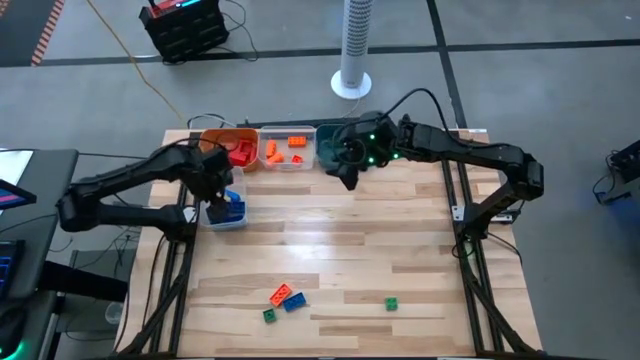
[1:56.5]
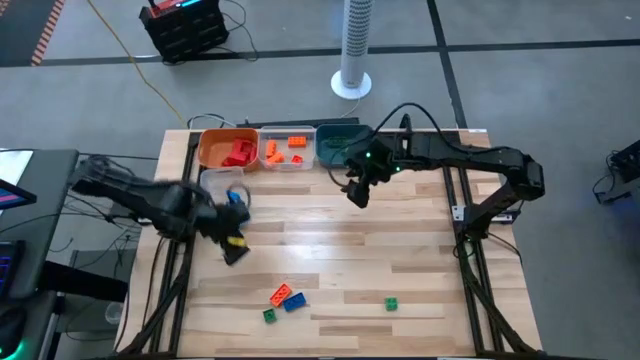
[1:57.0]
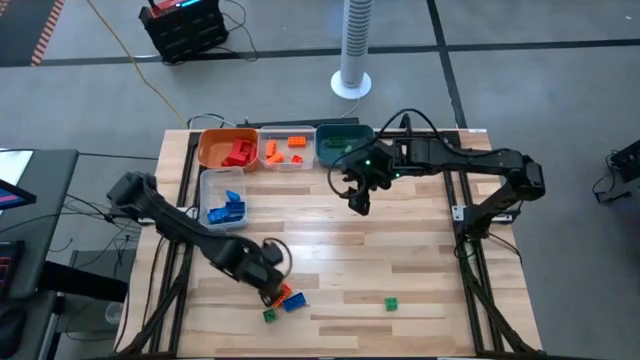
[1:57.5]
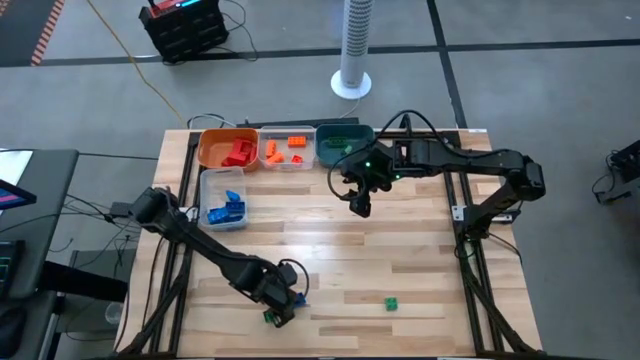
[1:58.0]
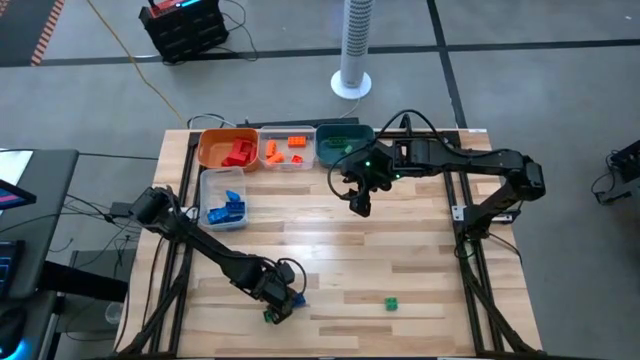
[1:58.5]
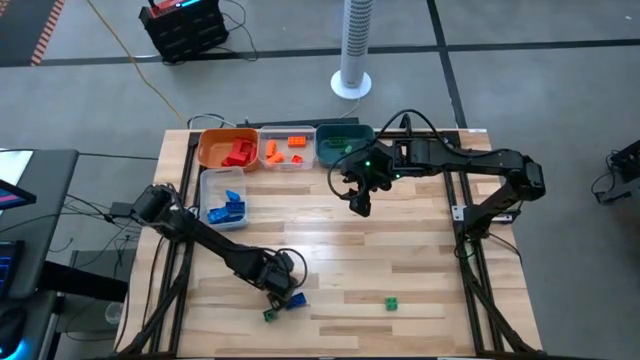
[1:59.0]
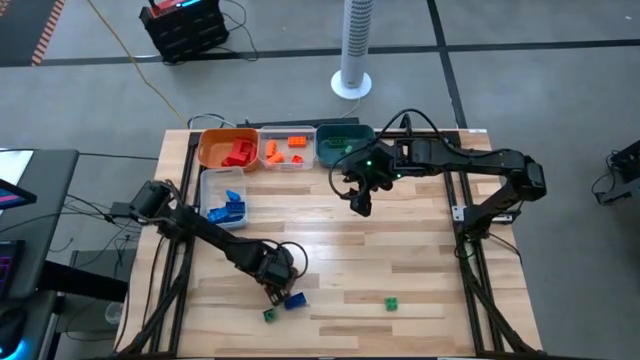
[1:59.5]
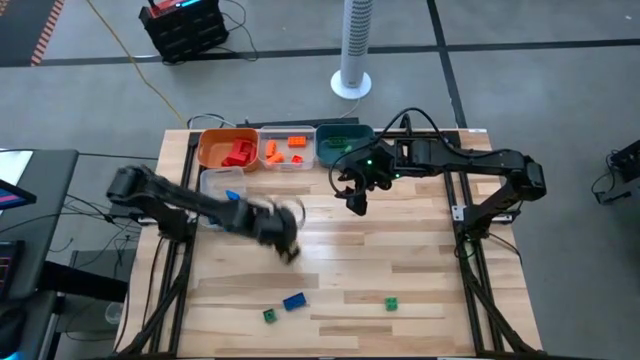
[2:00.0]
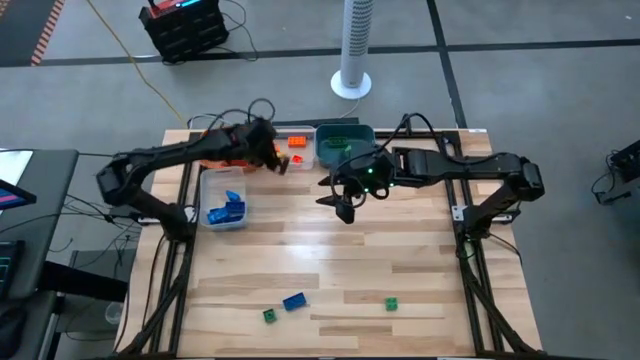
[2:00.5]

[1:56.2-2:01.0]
Task: Sort blocks
Put the orange game piece into the top transparent bin

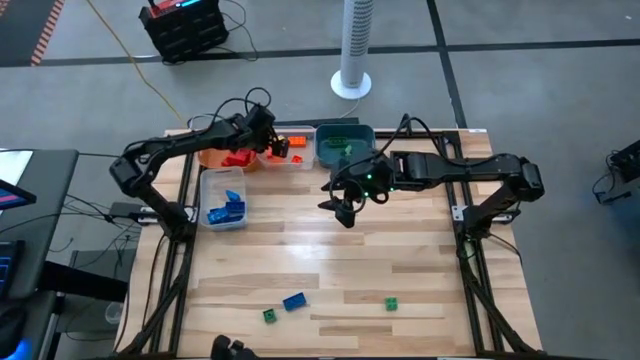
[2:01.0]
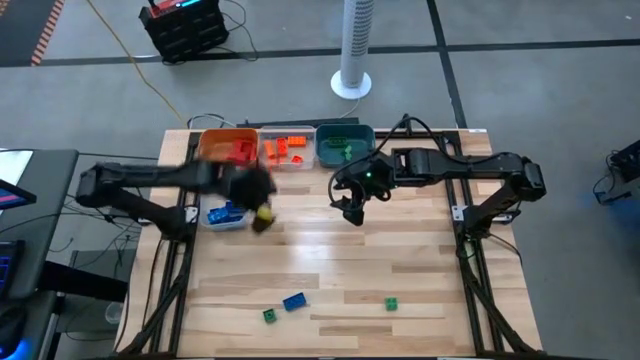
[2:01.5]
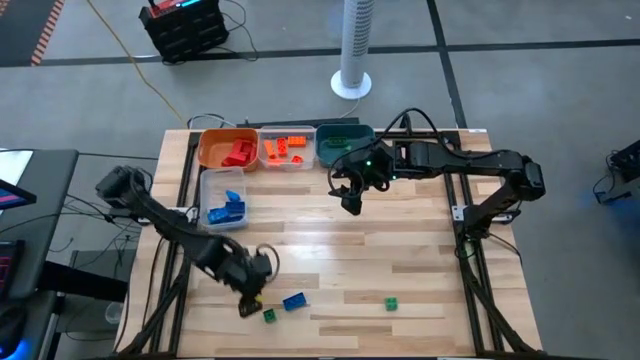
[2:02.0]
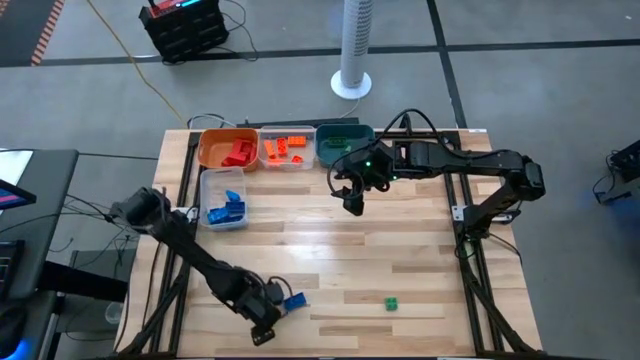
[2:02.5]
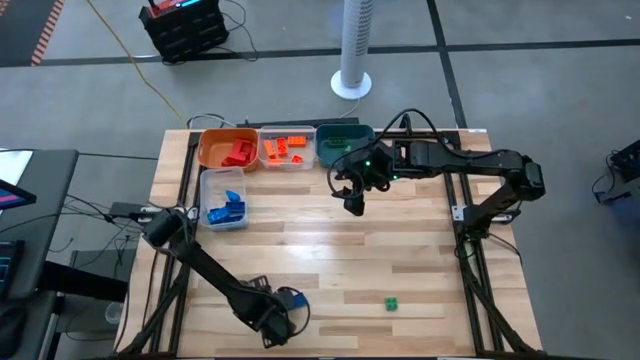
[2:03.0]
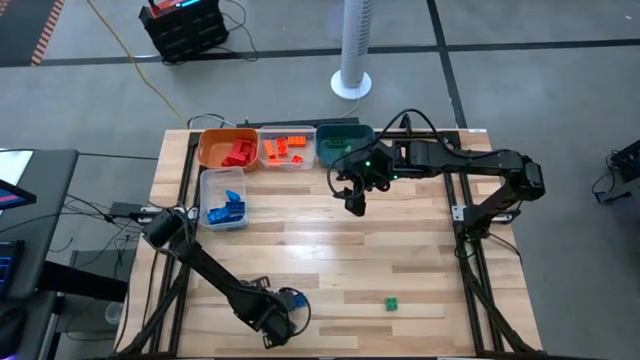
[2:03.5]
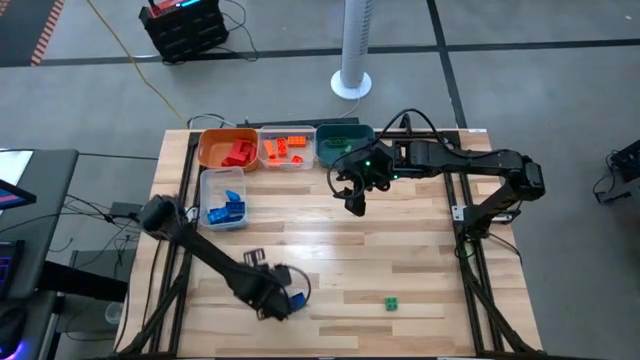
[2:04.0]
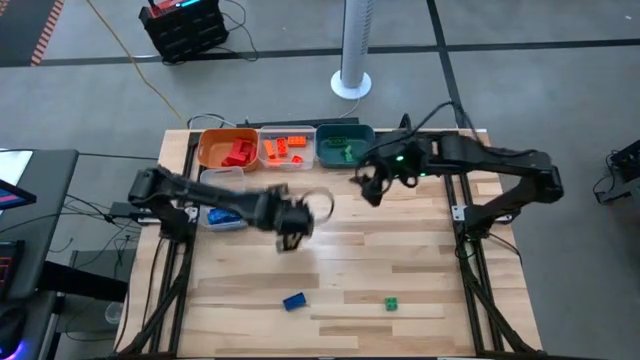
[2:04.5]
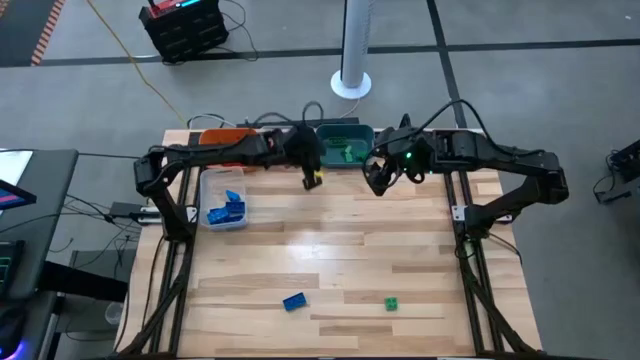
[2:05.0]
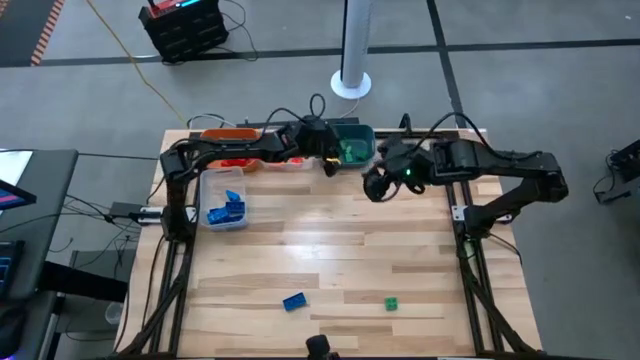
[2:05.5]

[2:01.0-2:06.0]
Put the green game piece into the blue bin

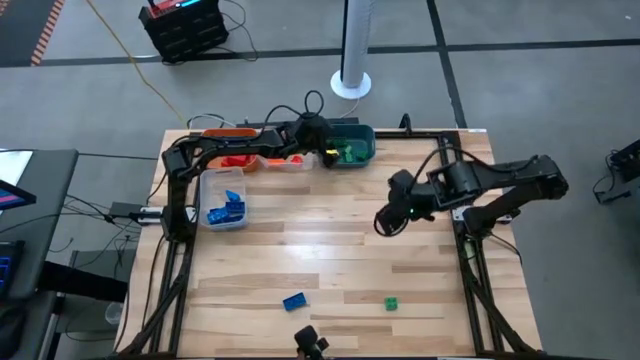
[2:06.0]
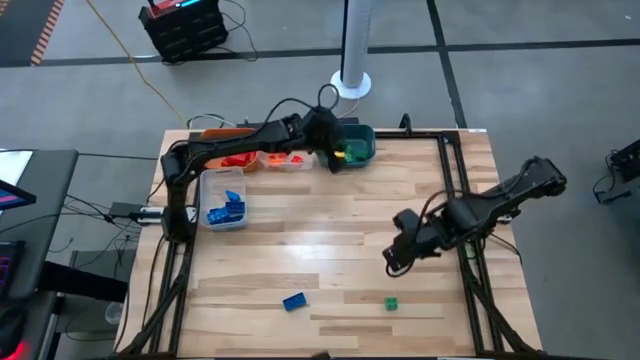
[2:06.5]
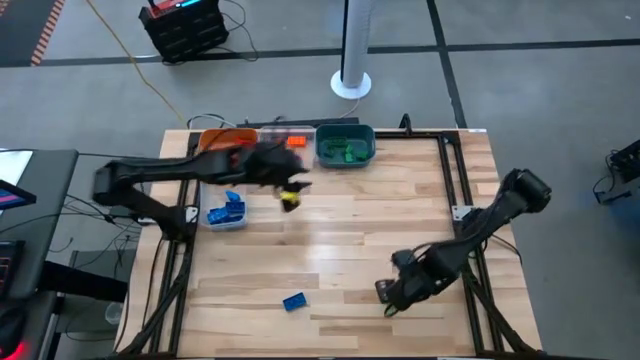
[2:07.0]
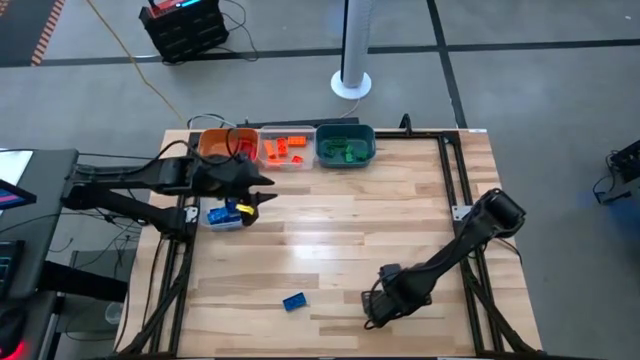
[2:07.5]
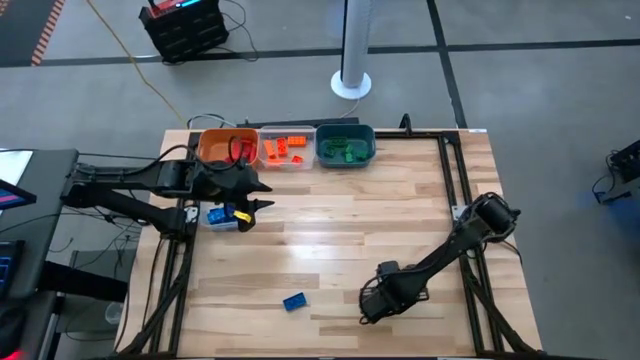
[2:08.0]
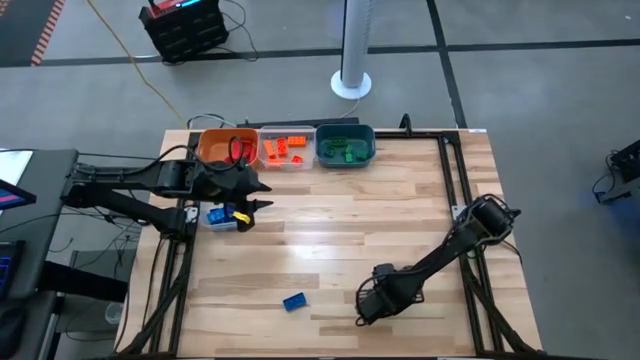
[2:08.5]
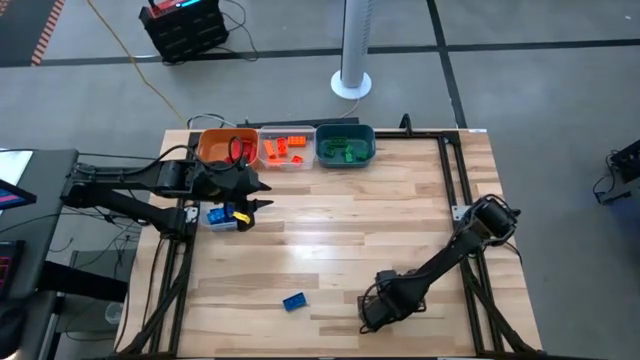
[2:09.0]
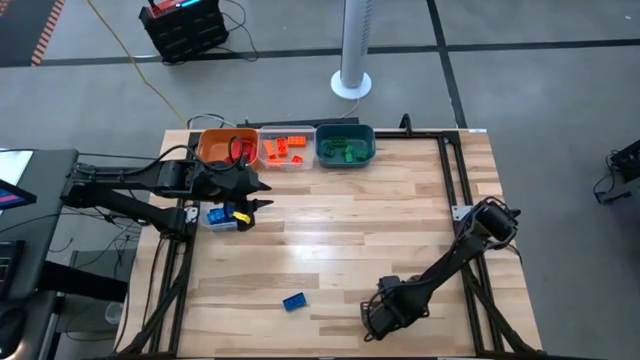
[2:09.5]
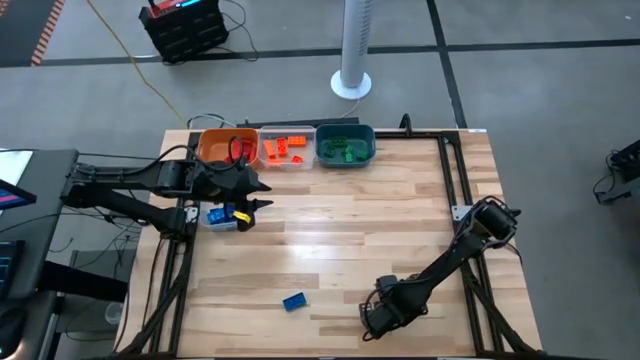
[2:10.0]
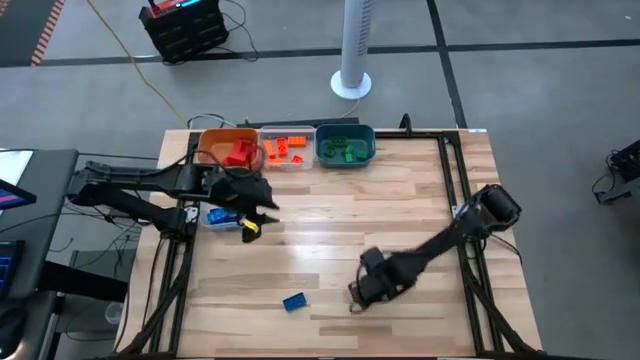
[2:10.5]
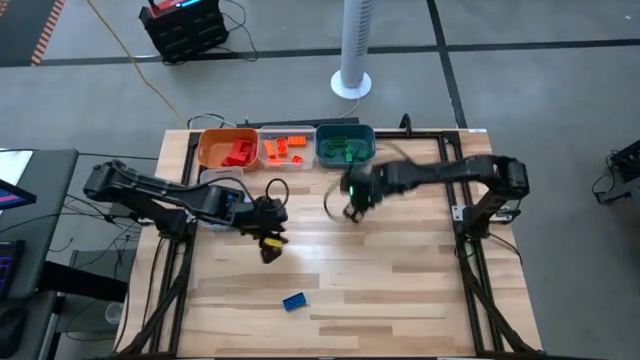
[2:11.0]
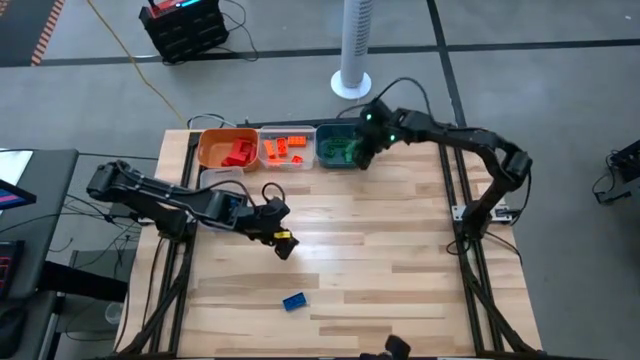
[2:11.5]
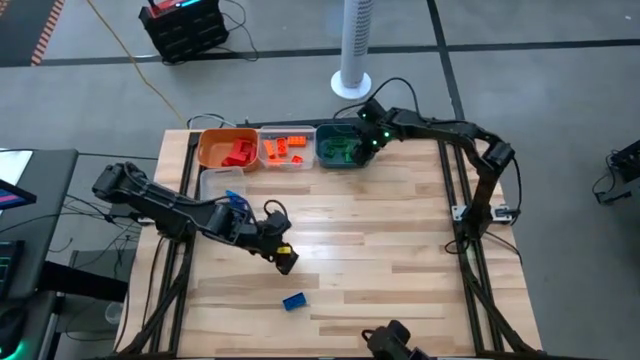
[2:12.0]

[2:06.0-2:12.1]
Put the green game piece into the blue bin

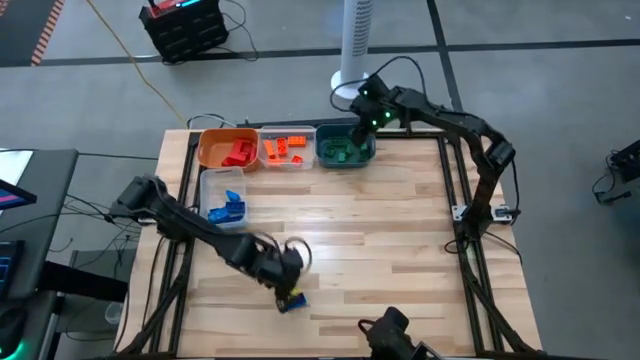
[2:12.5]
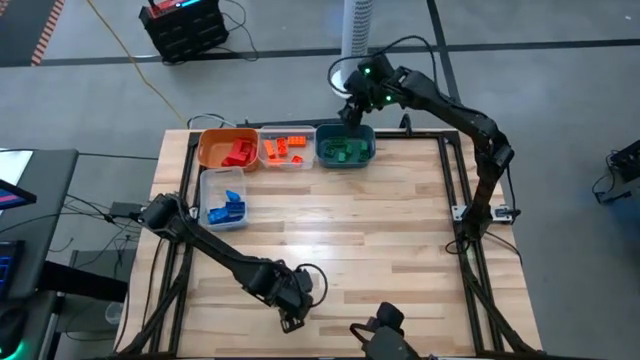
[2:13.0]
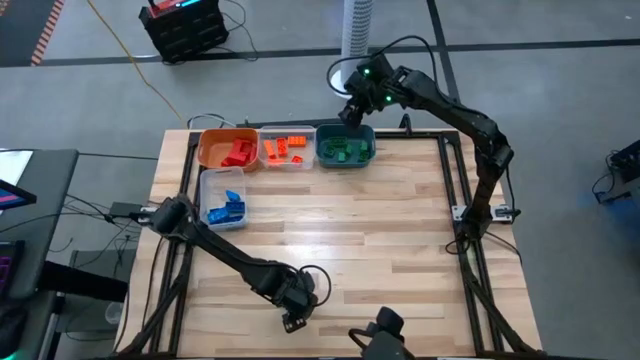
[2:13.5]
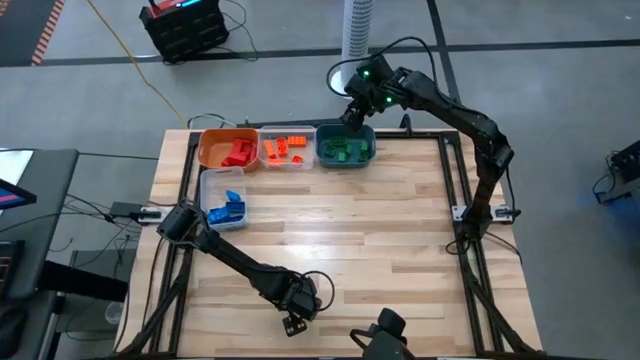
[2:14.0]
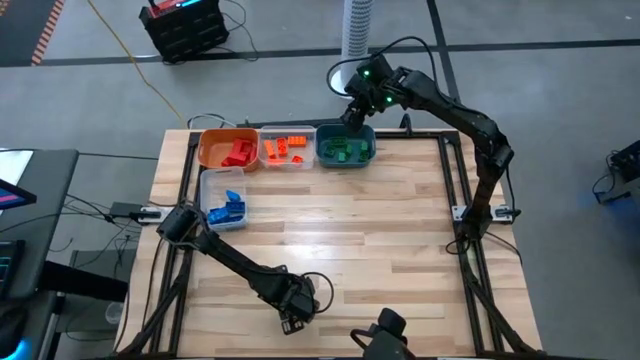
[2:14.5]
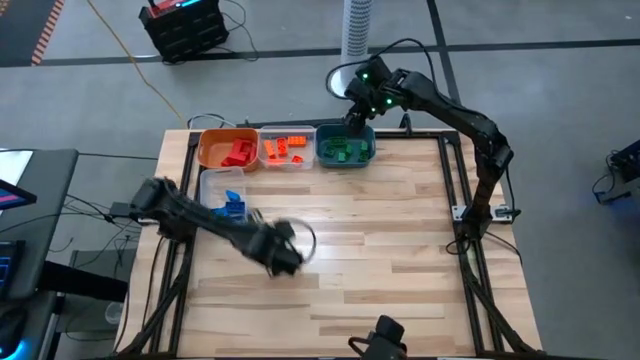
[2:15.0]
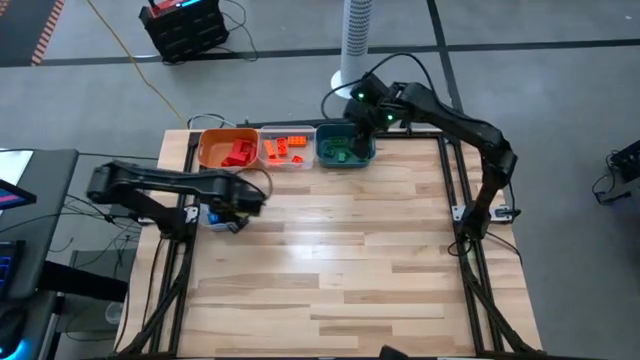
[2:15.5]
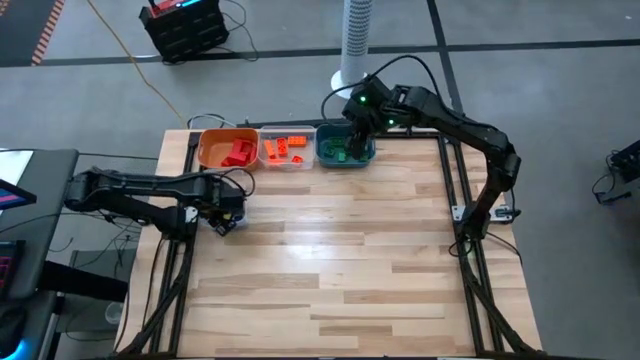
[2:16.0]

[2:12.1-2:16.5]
Put the blue game piece into the bottom transparent bin

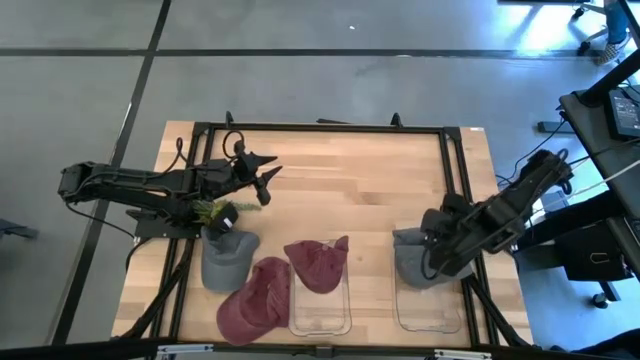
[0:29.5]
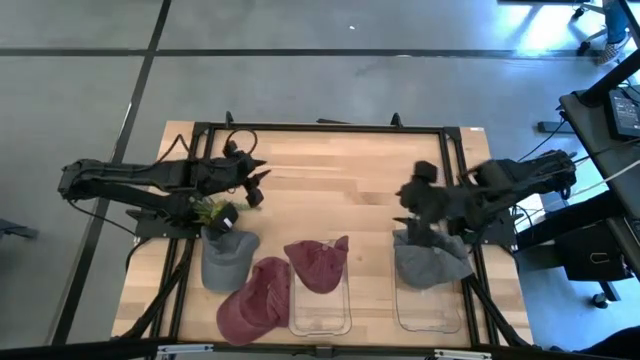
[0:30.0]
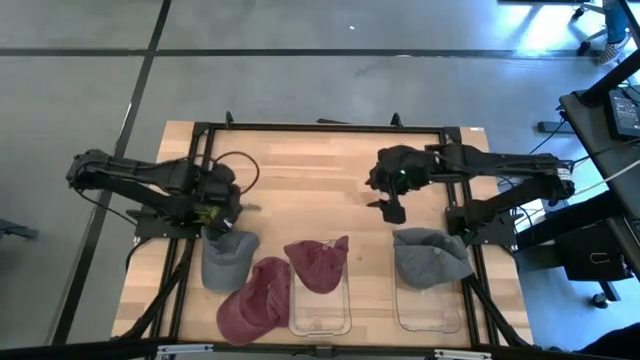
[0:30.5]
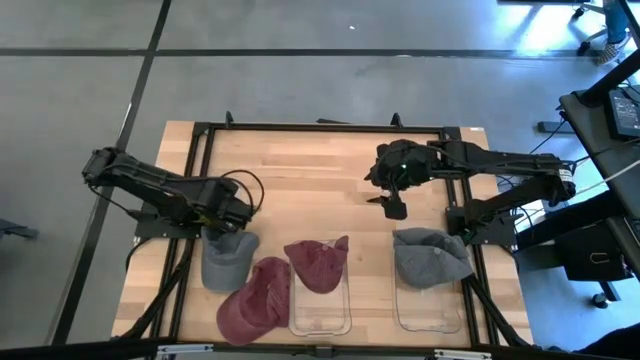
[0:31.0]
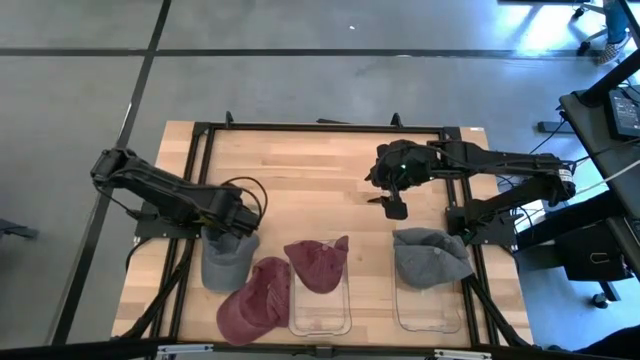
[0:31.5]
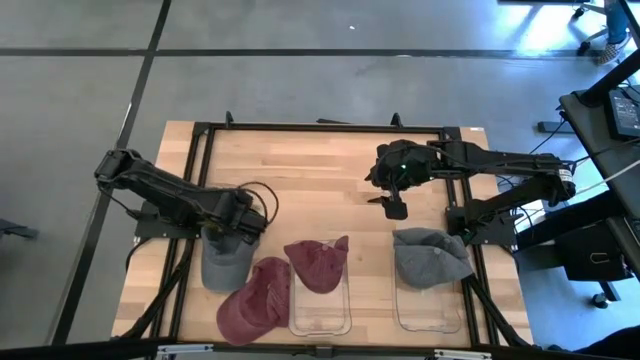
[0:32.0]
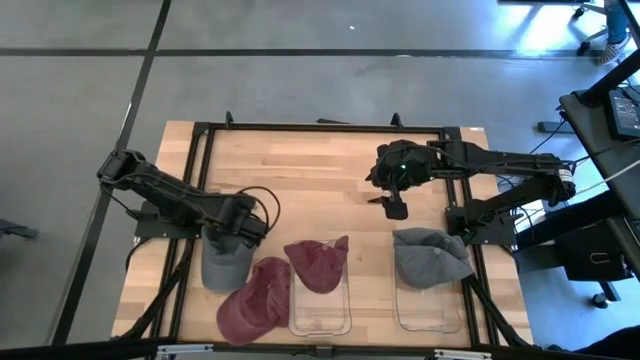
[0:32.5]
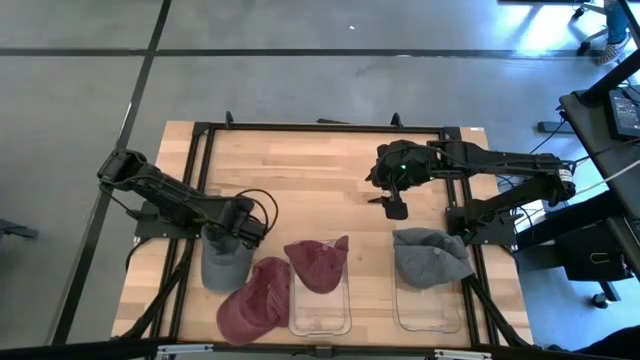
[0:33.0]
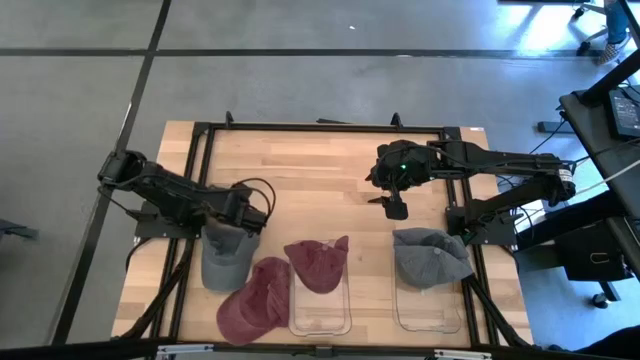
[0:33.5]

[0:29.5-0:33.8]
Task: Pick & Place hat
Adjust the green plant
